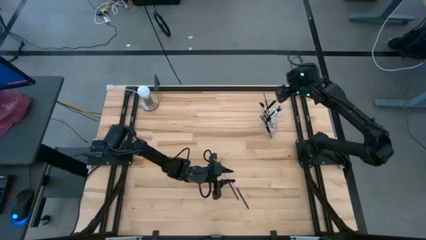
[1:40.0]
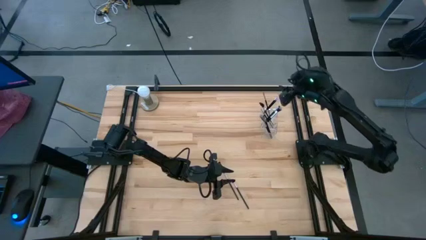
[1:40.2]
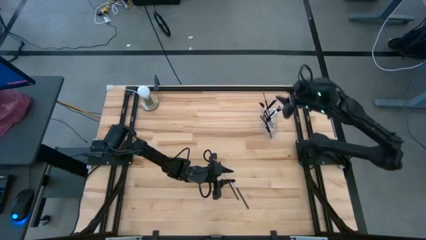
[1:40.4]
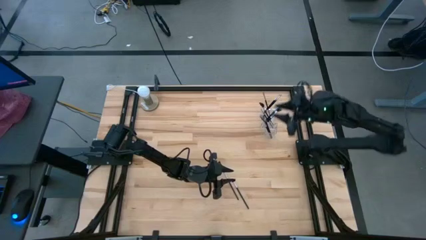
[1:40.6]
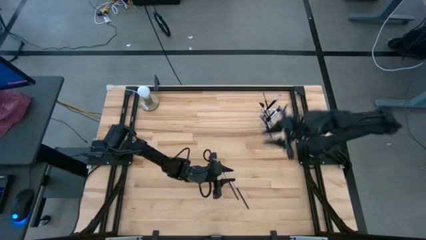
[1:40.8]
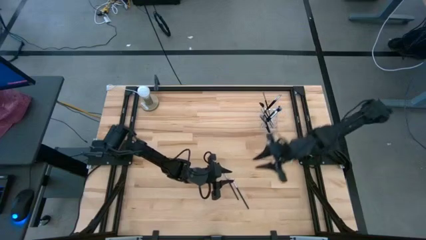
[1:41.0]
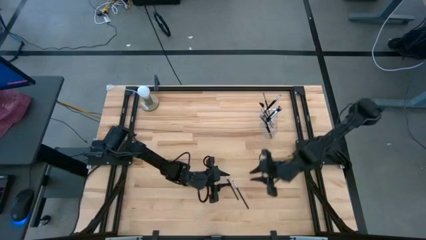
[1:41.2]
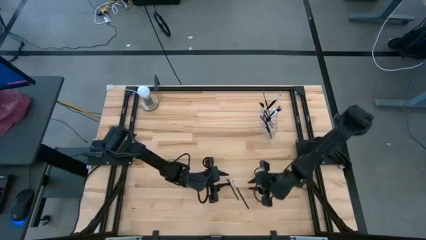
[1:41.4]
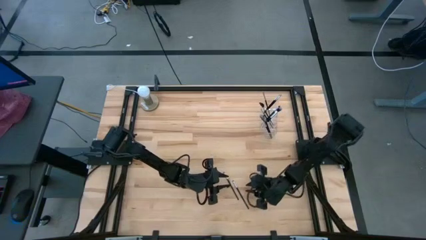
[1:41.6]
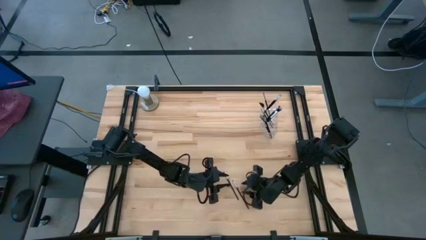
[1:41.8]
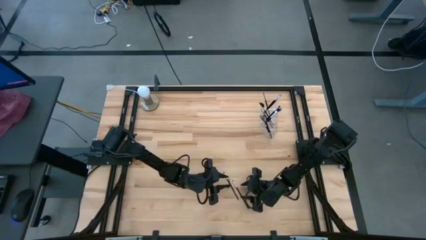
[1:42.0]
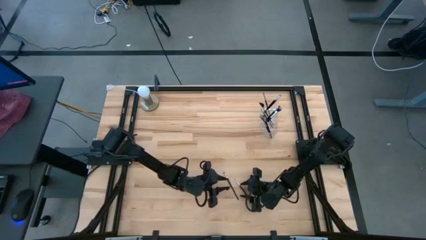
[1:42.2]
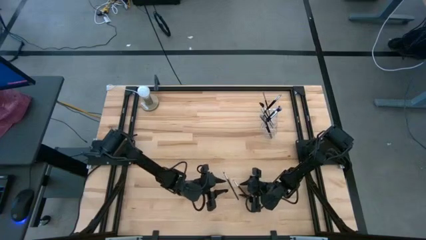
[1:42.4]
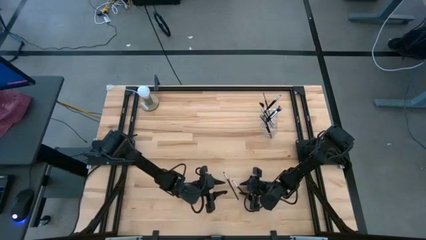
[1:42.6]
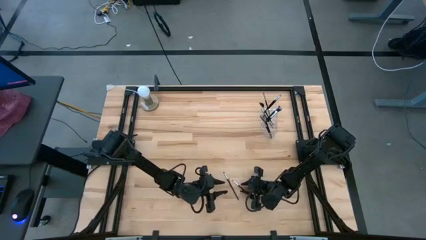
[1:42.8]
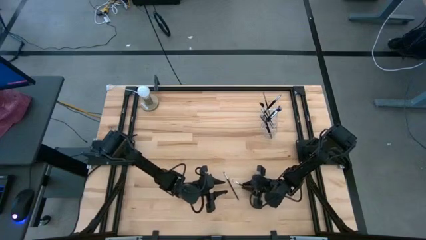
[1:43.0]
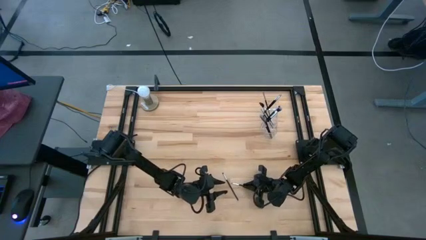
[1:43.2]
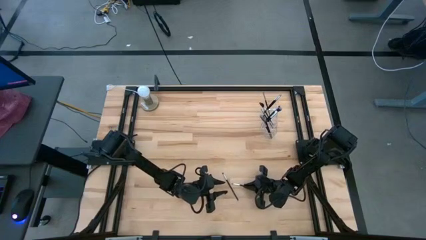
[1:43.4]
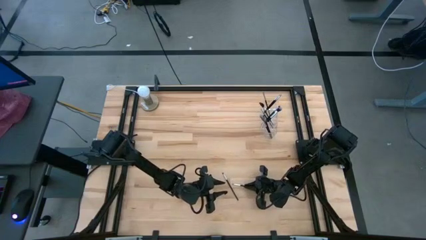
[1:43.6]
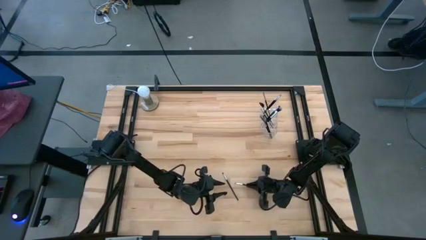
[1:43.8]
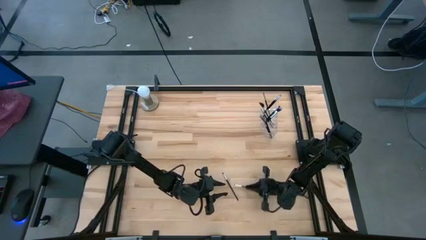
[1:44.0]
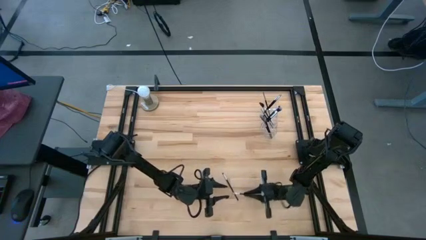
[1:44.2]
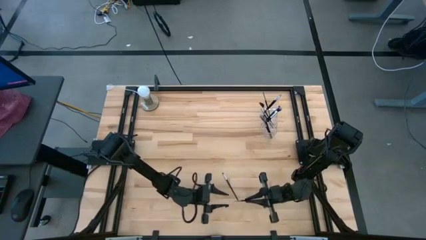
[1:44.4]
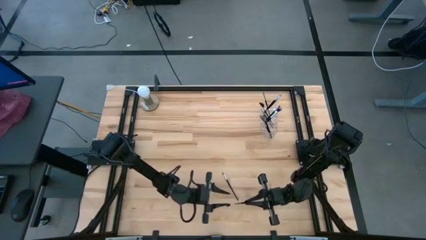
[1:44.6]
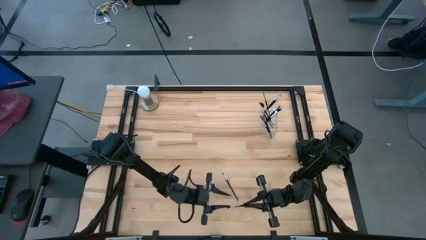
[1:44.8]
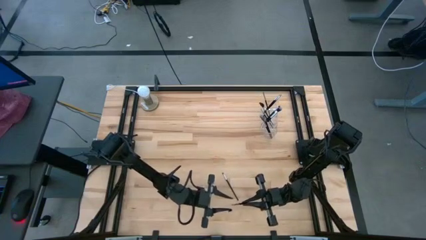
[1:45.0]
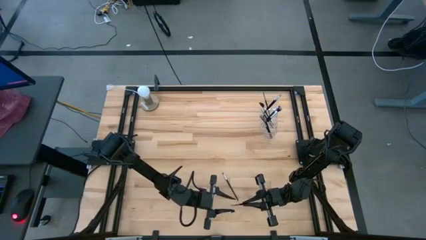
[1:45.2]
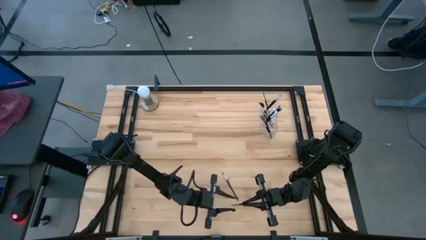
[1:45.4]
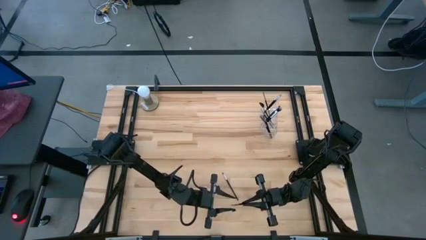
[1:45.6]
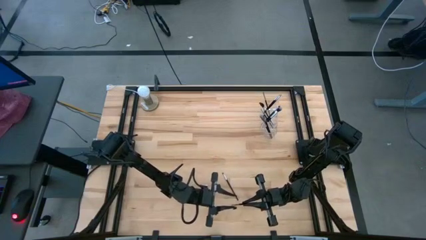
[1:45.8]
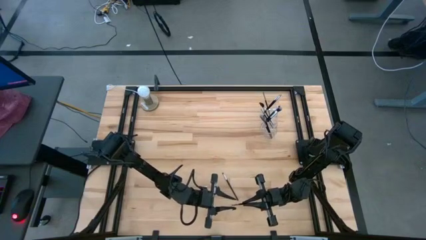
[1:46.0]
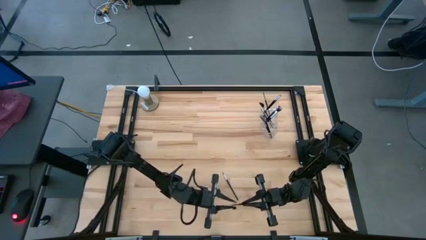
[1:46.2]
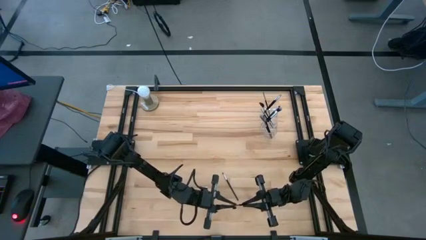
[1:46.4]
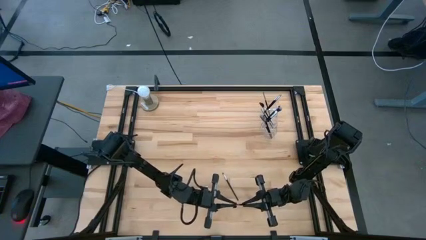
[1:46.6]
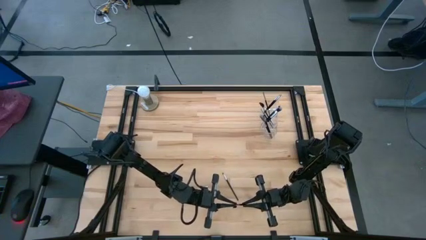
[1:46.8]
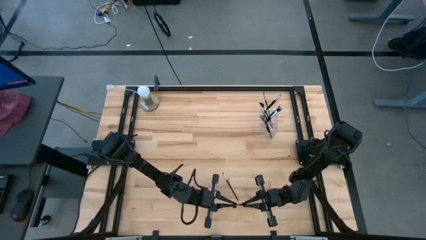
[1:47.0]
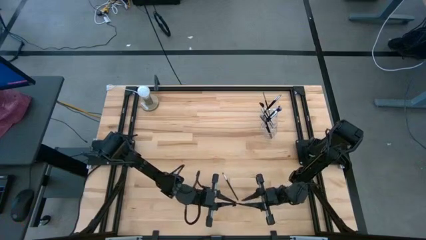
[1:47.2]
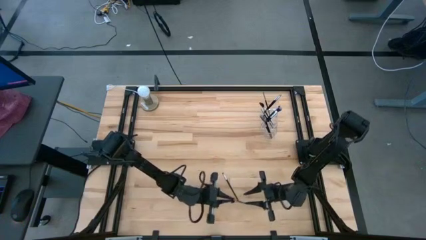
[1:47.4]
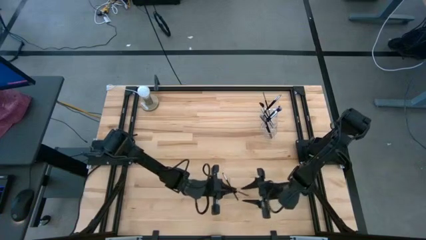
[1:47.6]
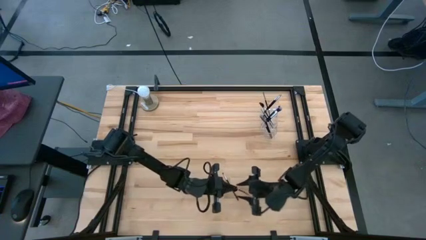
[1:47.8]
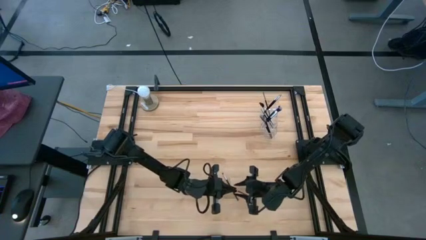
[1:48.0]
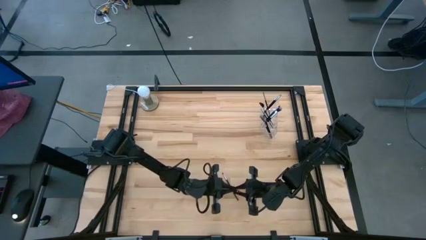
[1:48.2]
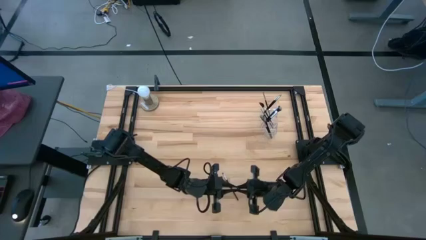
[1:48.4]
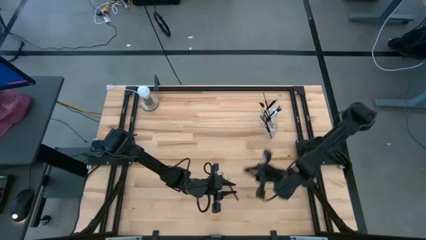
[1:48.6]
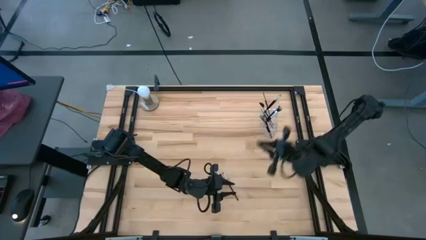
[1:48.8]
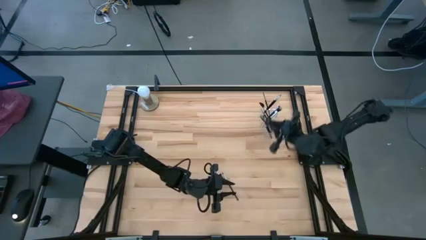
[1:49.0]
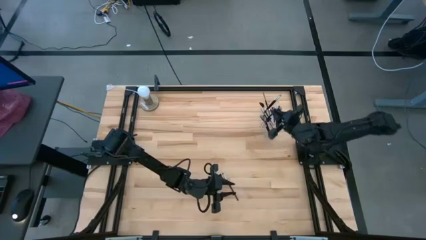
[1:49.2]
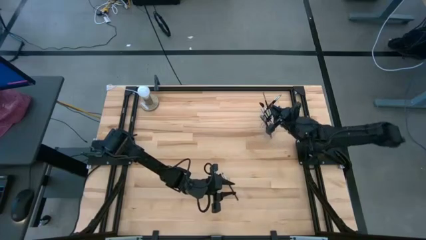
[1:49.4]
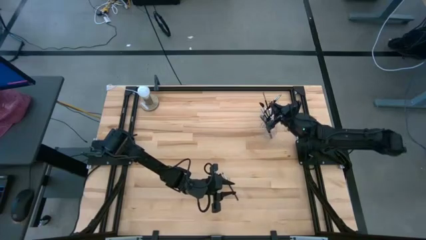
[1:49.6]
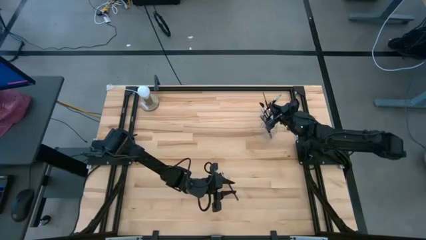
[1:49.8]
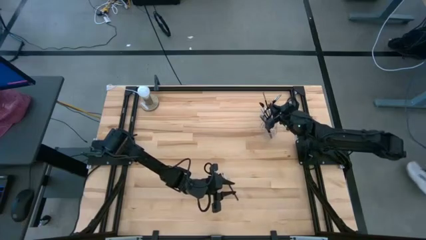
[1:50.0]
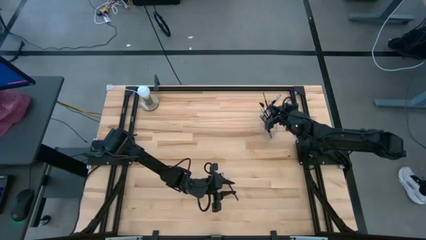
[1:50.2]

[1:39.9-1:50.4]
Task: Sort items
Put the silver eyeshadow brush into the transparent organizer

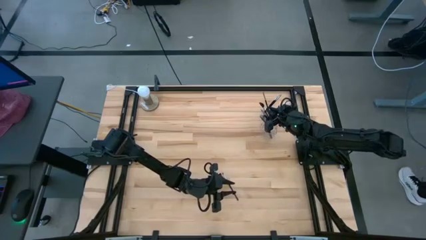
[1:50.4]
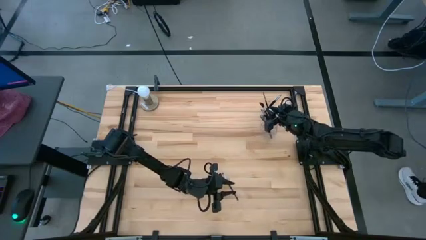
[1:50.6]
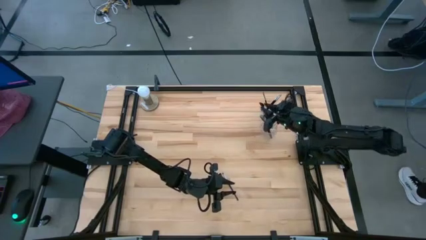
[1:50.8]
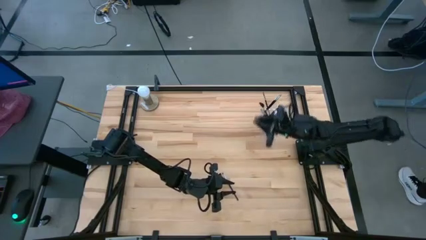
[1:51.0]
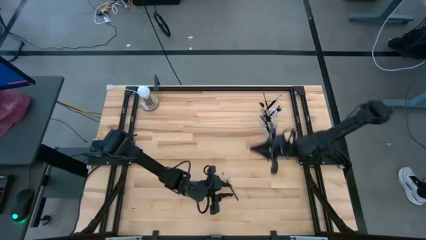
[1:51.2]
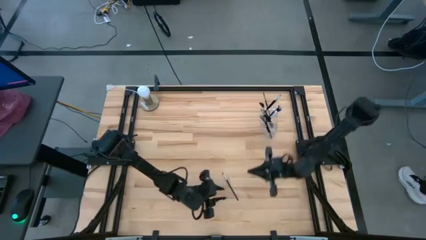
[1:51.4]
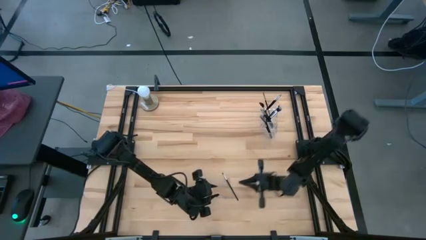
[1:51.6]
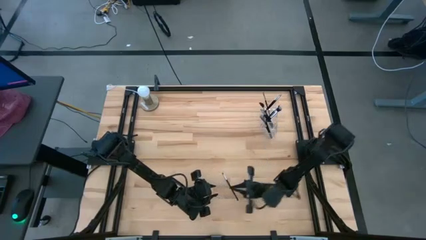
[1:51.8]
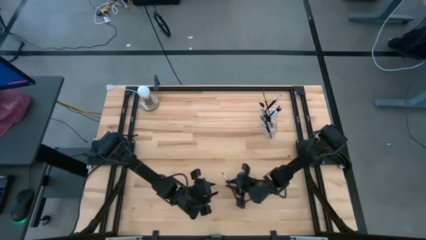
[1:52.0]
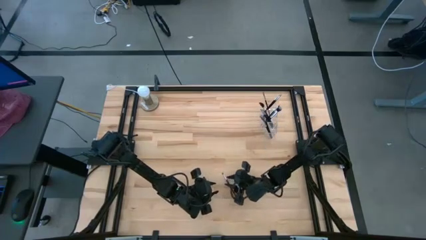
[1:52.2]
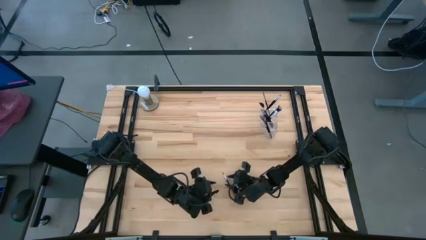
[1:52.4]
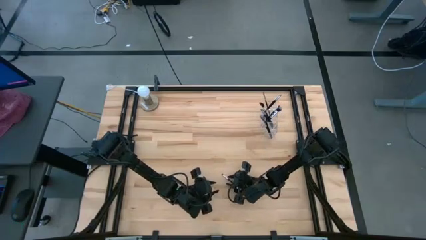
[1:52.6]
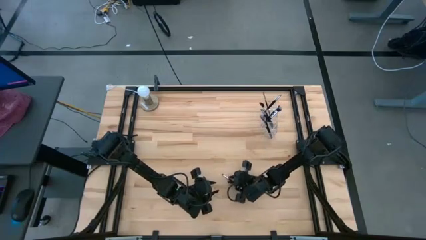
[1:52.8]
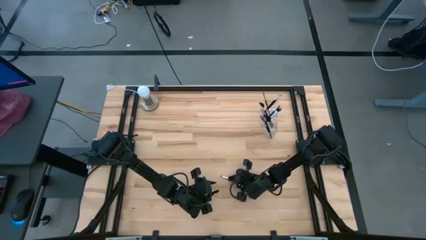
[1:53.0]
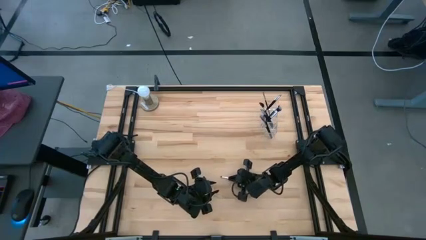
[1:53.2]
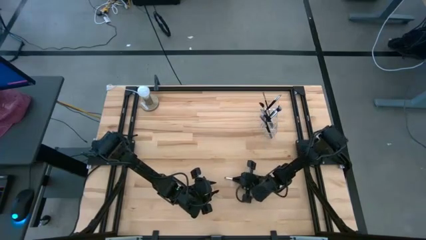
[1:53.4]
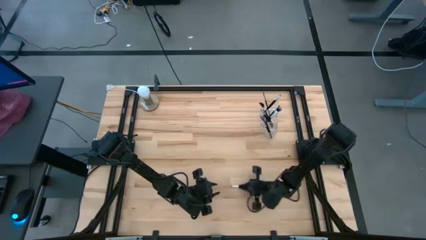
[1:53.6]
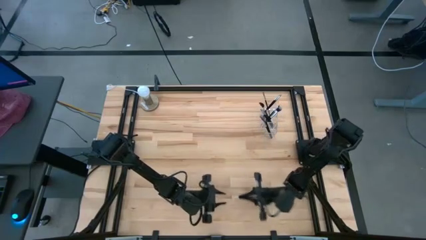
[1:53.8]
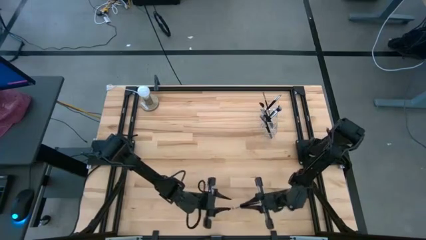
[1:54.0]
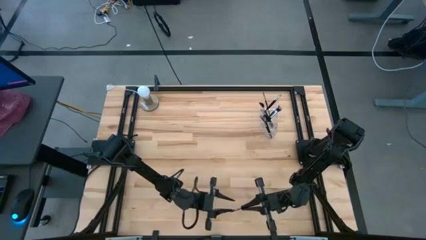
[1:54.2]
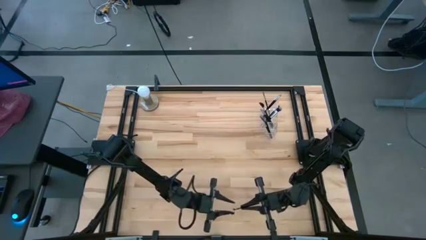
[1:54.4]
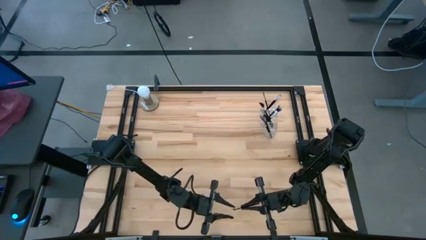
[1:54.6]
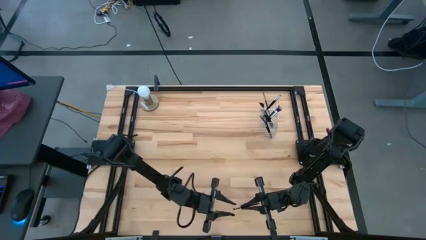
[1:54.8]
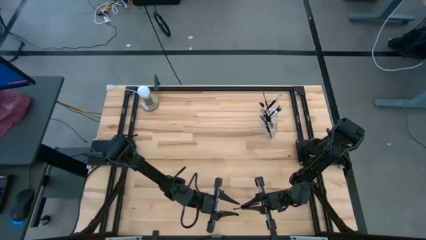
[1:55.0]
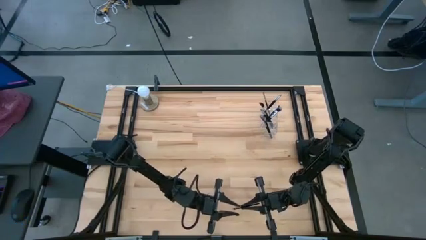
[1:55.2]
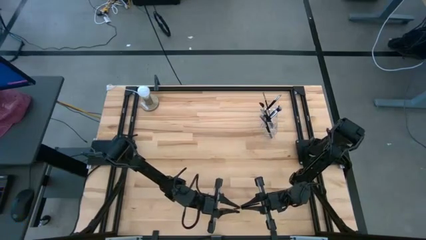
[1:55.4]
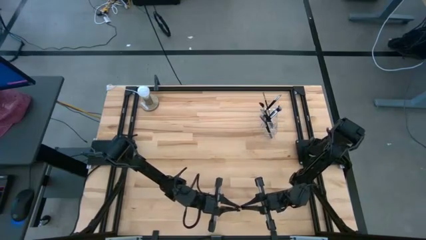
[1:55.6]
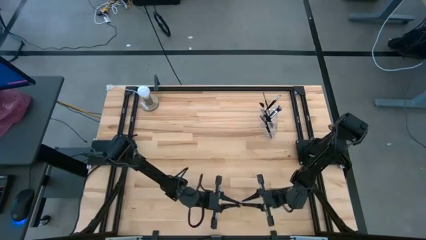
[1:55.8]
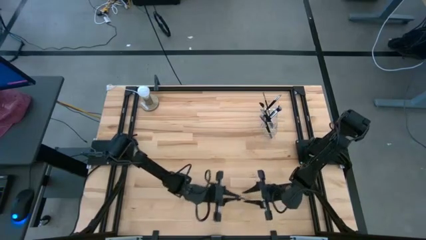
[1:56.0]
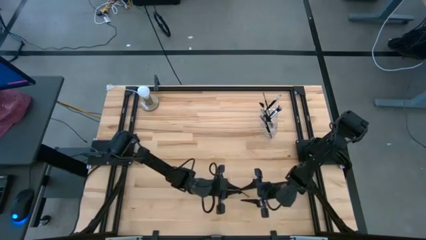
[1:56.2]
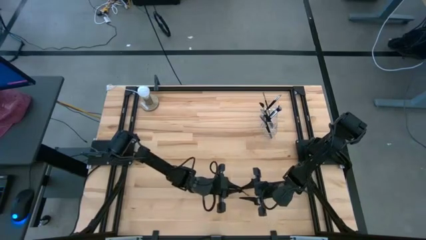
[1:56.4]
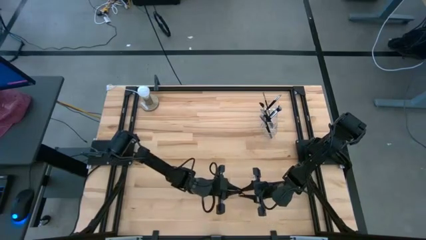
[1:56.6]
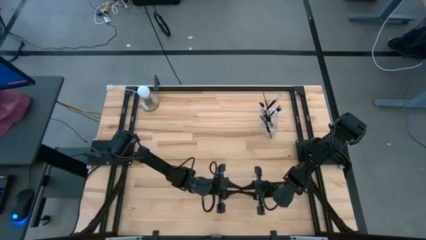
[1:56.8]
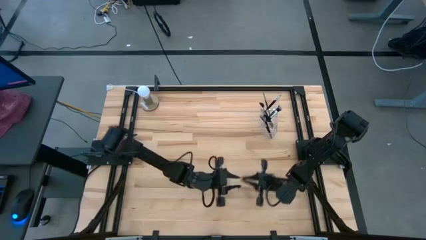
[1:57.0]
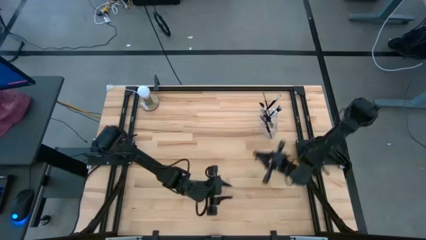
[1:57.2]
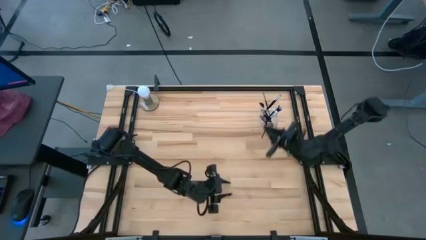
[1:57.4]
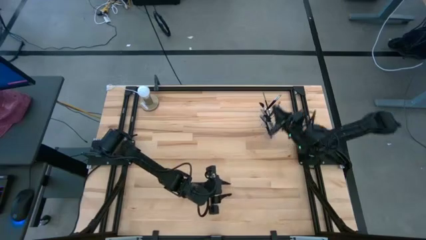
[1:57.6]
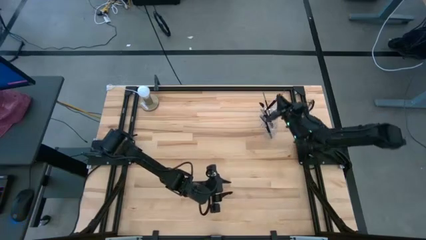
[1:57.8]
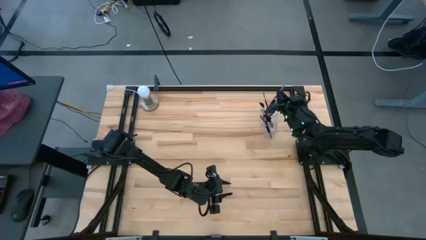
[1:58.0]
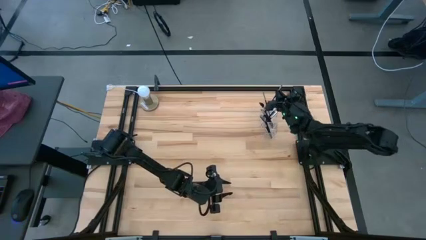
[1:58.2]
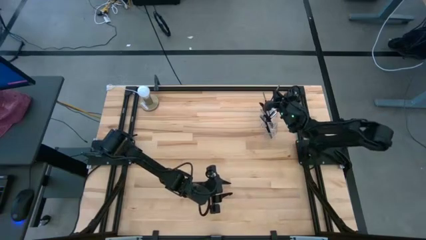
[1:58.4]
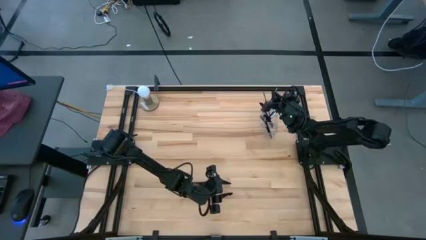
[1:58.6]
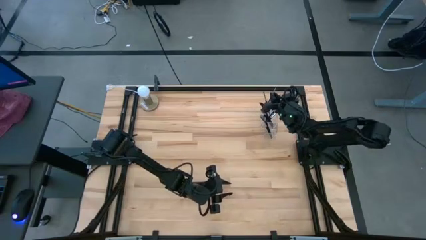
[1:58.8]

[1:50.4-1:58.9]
Put the silver eyeshadow brush into the transparent organizer
